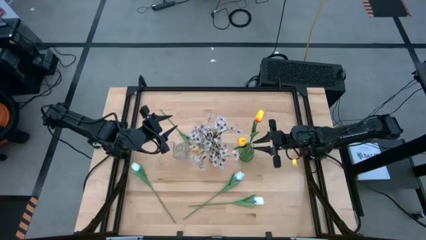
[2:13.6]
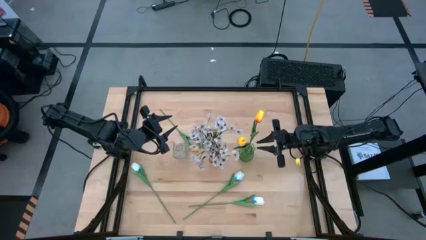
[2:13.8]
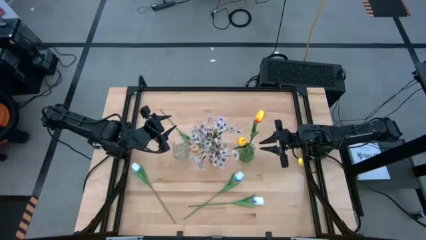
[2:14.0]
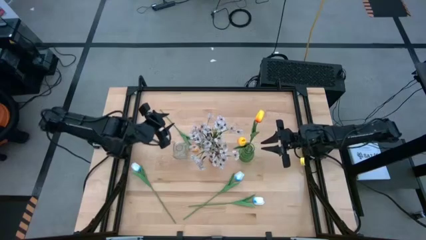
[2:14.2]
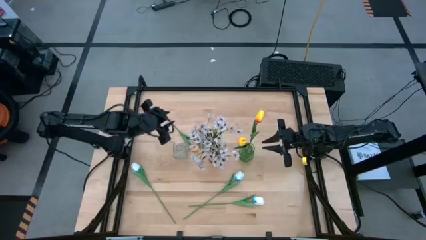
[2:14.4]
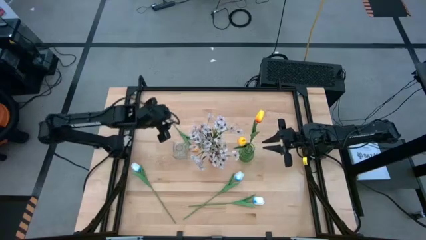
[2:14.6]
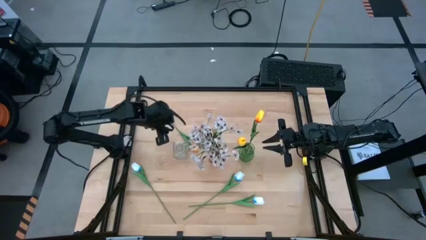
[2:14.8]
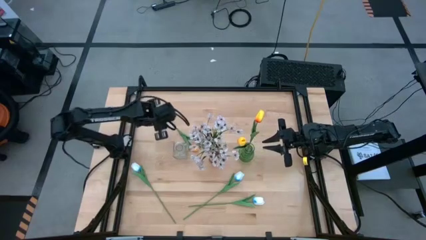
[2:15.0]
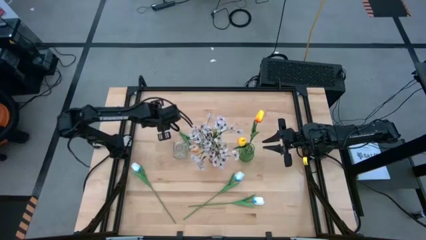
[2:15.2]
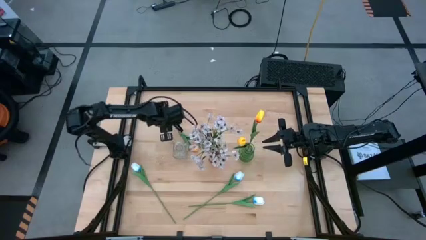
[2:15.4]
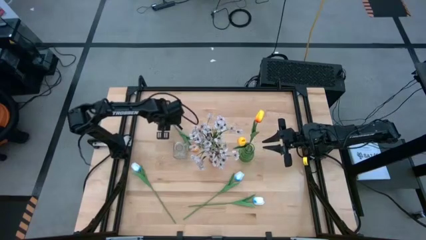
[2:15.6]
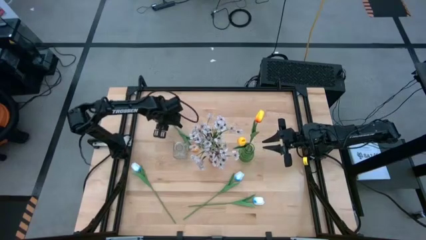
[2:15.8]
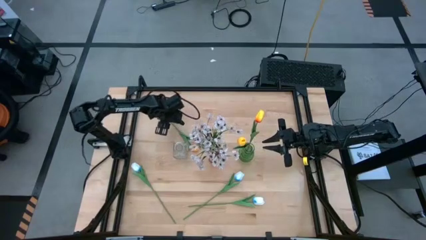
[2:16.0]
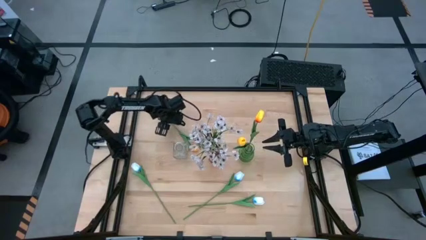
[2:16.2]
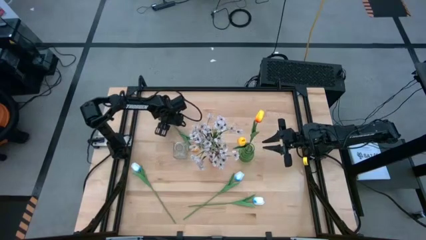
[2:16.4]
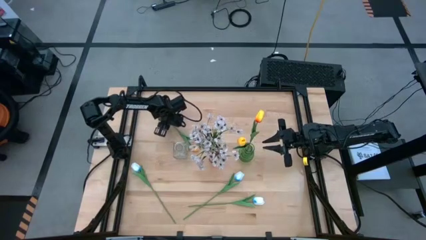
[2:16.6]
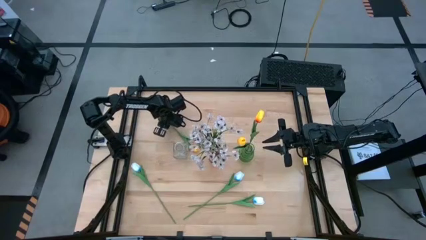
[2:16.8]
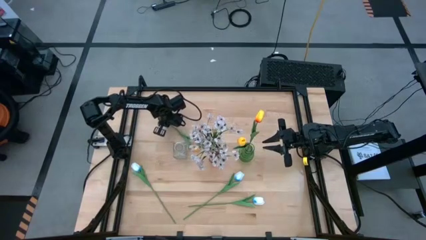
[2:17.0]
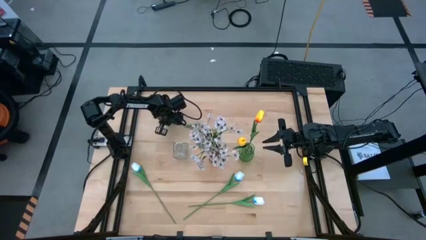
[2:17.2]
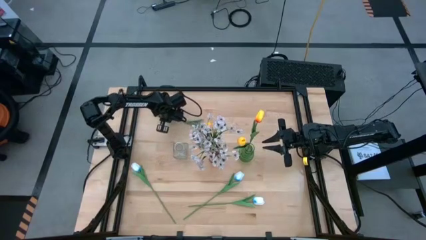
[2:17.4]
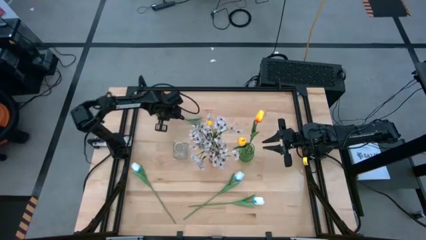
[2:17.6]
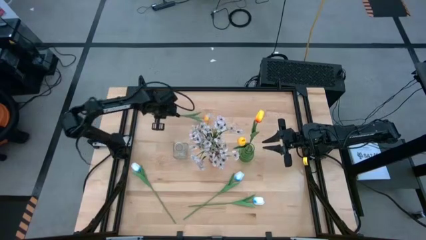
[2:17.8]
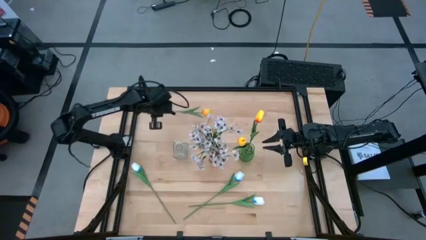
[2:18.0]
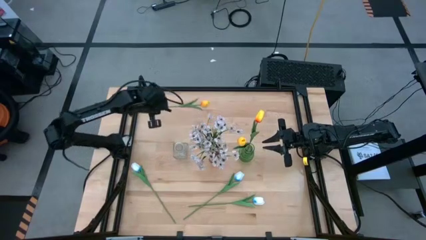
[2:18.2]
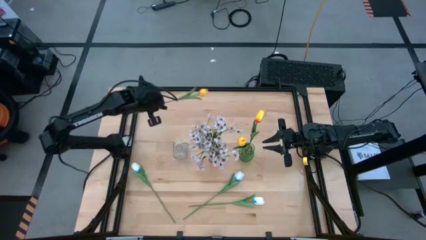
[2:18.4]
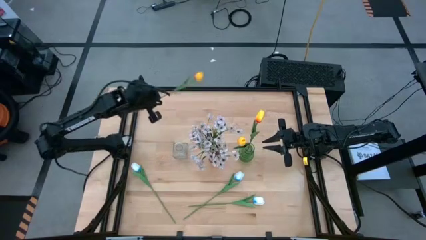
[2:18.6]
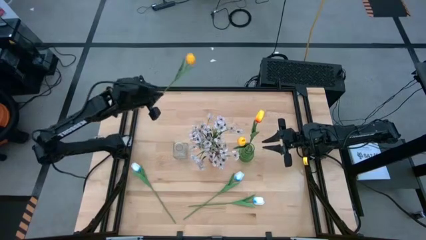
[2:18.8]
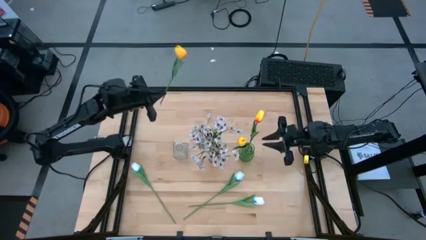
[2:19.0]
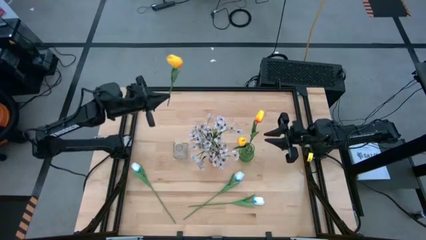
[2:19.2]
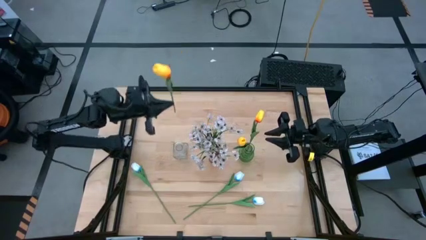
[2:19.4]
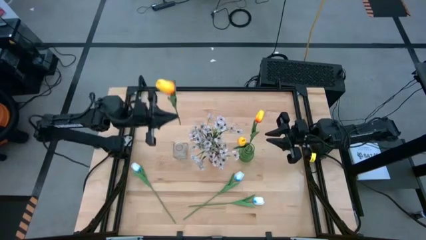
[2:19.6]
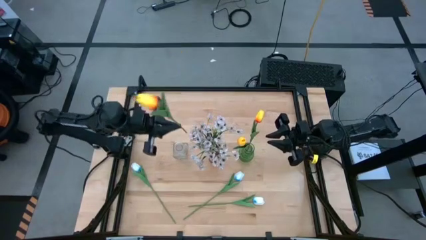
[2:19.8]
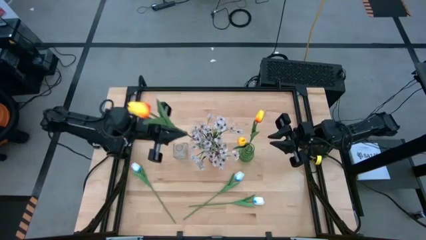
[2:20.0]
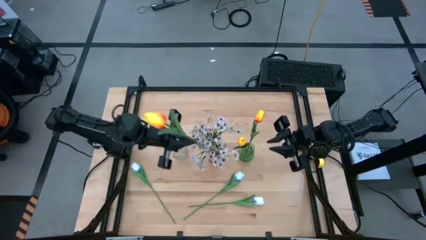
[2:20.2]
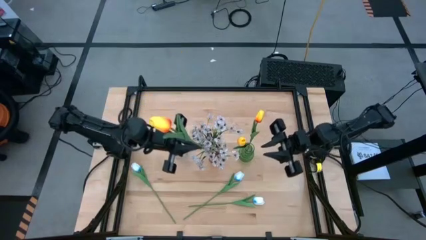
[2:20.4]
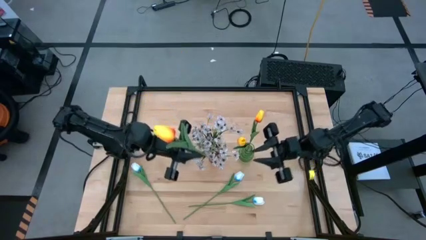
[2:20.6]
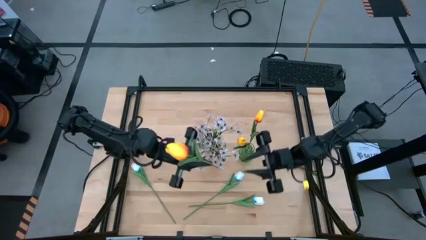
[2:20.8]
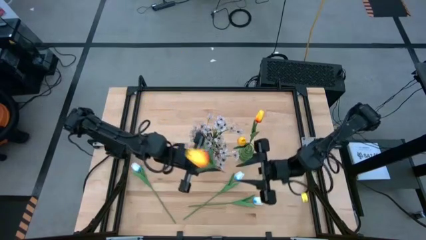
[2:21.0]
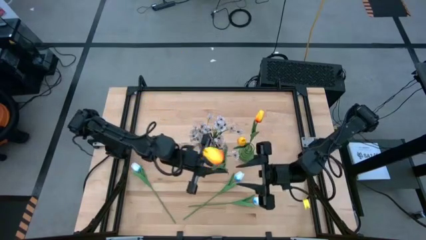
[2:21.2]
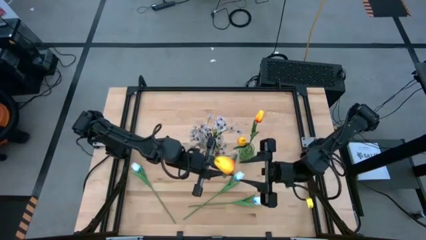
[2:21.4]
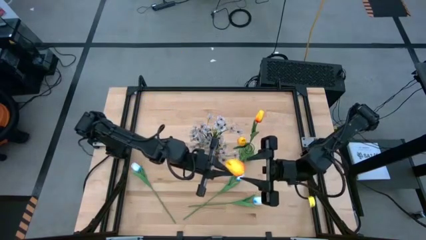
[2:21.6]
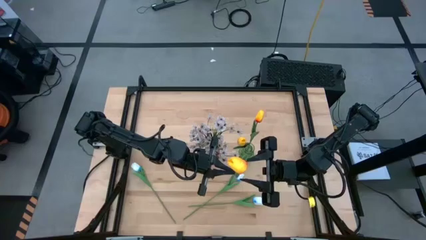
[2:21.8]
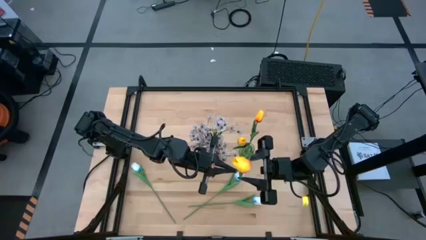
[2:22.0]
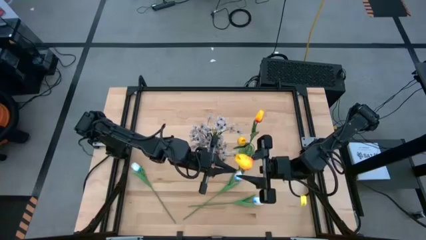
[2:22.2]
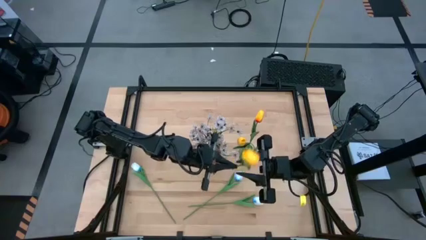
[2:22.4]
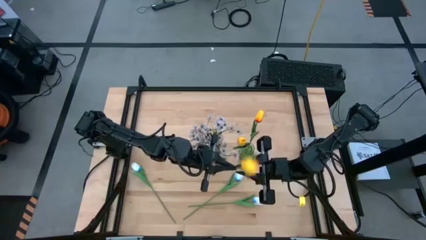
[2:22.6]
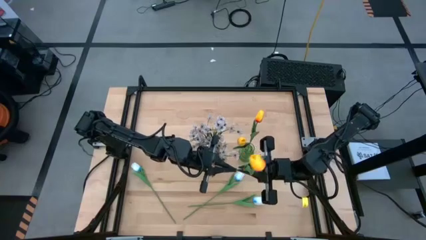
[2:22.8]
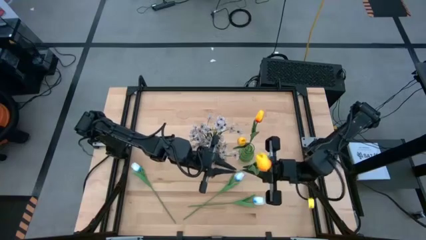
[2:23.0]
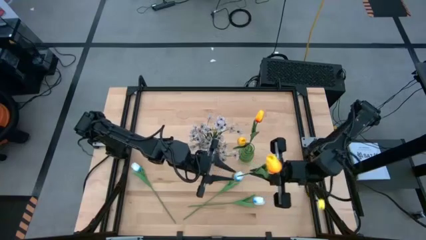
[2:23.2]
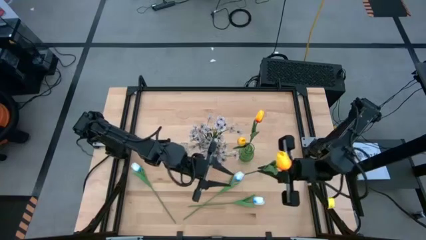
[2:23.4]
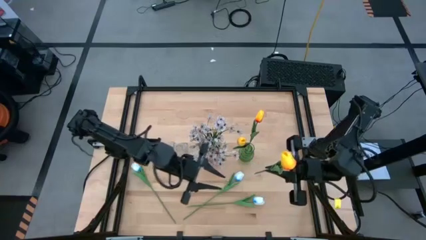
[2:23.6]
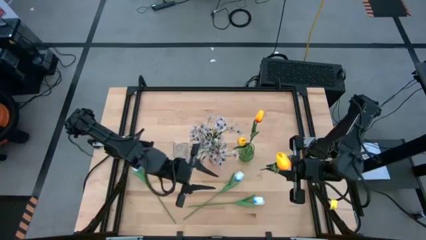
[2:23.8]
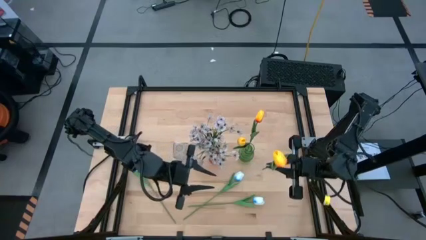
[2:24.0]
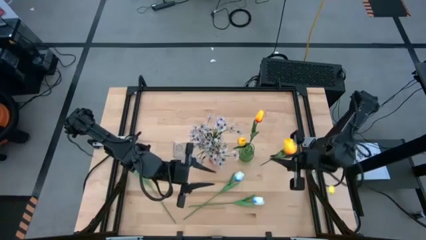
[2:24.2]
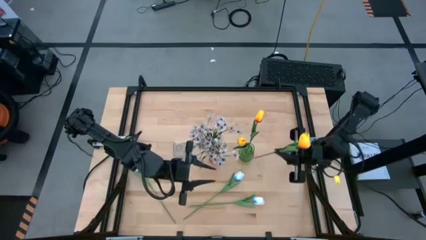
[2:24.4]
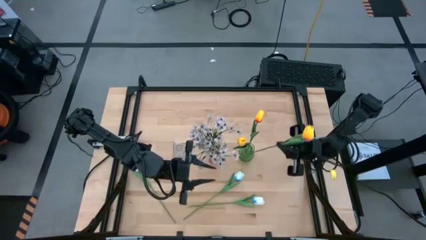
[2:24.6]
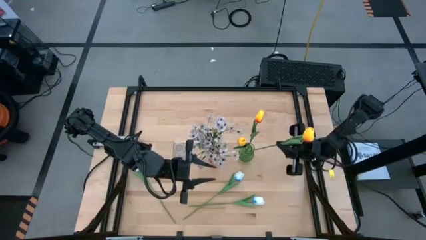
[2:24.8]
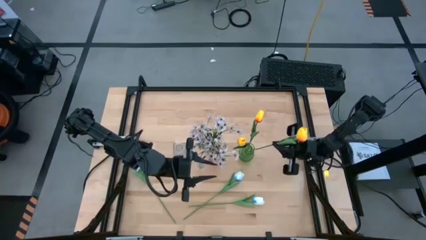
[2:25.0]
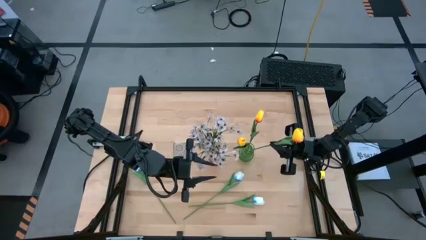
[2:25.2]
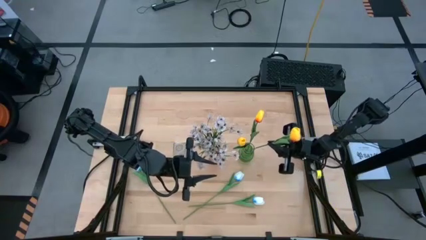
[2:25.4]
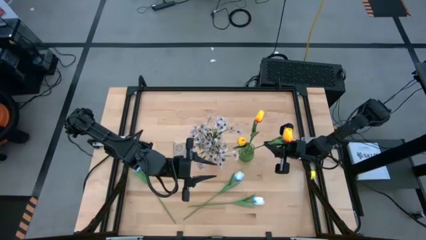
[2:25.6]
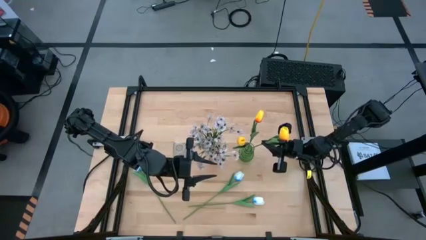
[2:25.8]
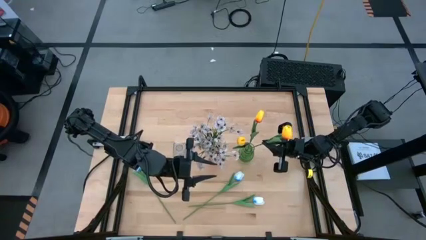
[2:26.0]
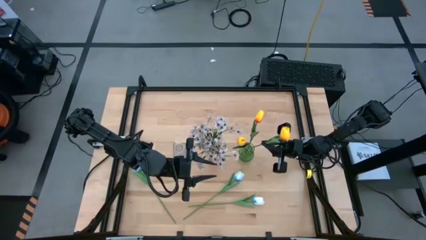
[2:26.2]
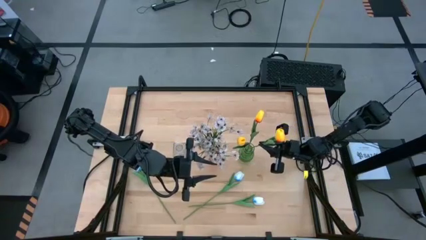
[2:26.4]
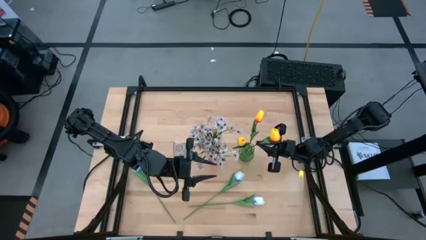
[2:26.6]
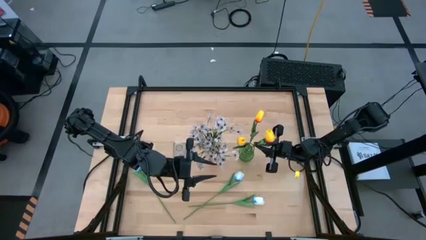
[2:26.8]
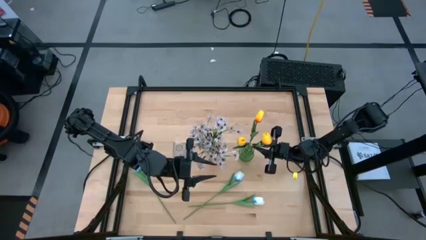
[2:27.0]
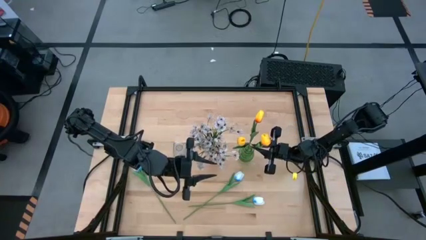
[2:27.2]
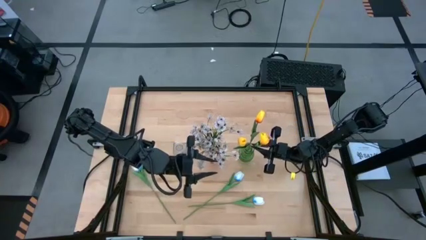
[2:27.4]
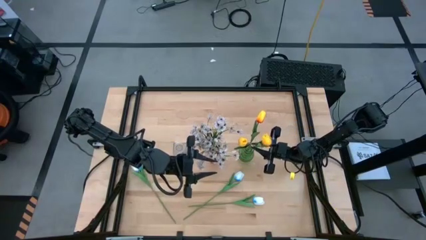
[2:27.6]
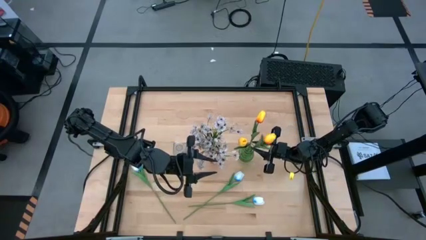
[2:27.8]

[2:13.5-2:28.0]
Task: Sort flowers into vase by color
Put the yellow tulip into the green vase

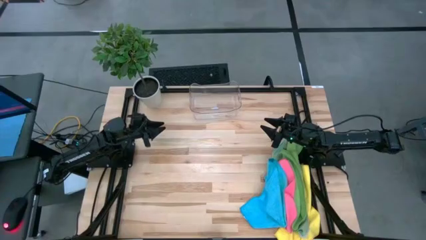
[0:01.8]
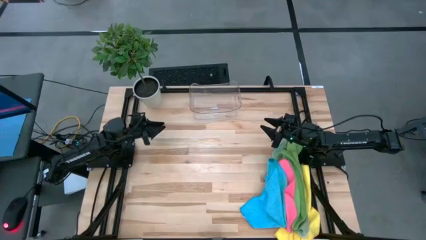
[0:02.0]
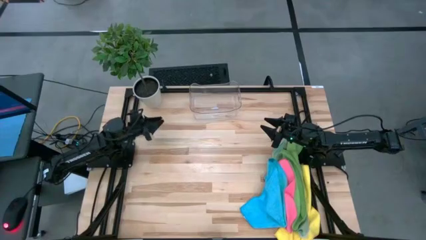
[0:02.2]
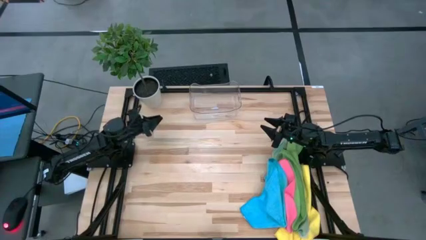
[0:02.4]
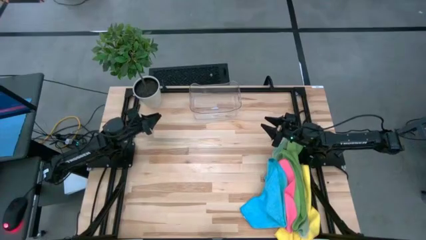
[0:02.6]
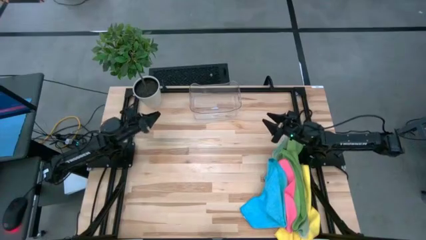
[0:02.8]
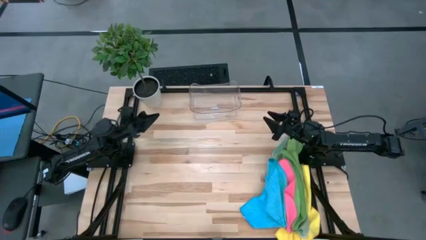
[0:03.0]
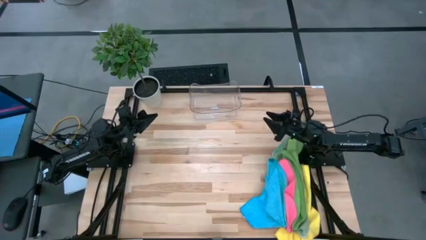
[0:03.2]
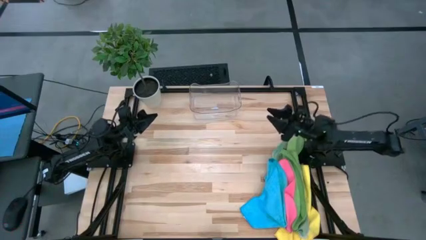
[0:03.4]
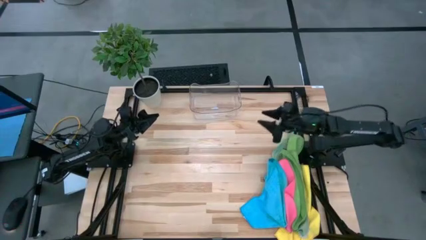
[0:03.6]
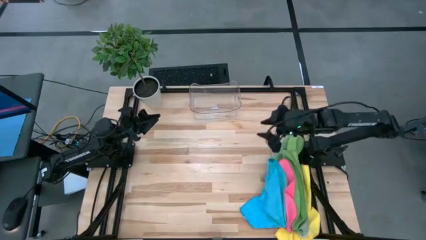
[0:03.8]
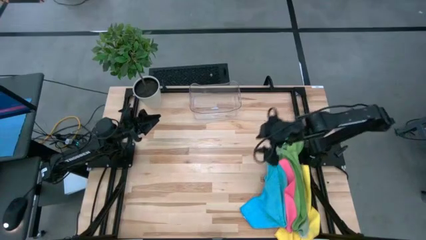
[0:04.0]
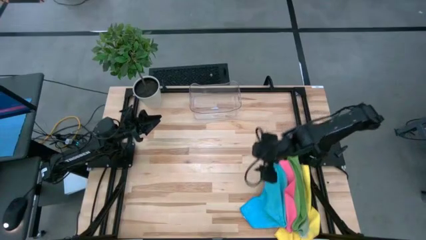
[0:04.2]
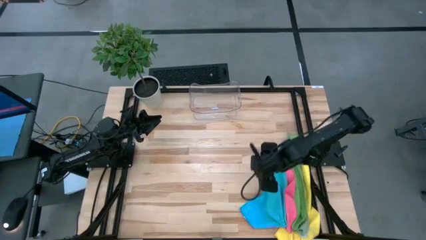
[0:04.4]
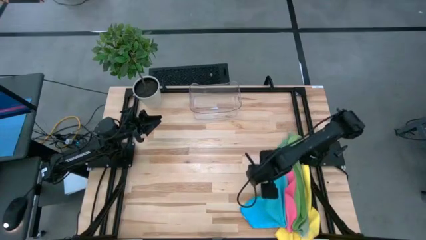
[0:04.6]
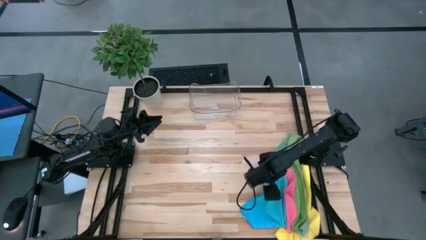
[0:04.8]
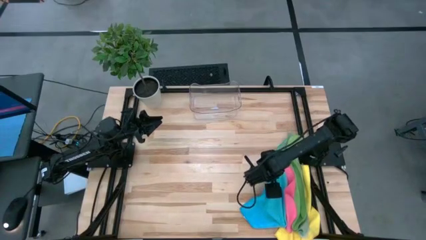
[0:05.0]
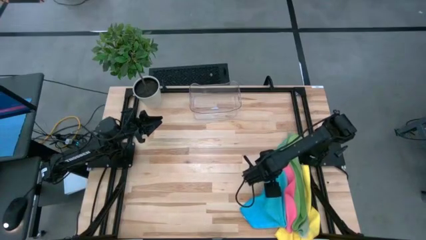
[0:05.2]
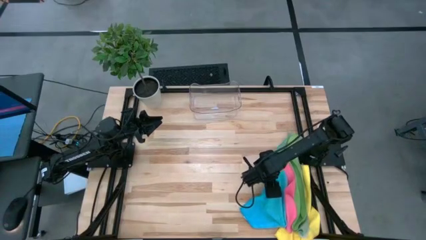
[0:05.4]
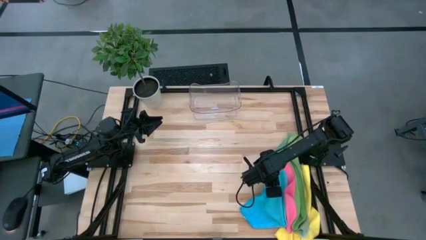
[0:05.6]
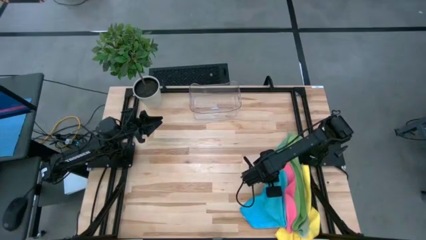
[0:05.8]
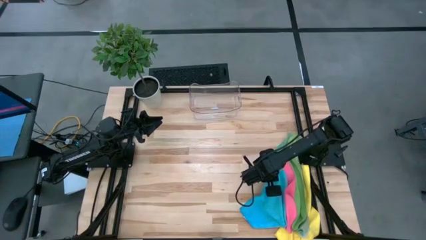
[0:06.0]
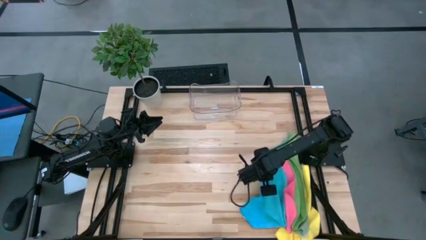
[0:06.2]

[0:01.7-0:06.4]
Task: Fold microfiber towels
Fold the blue microfiber towel
